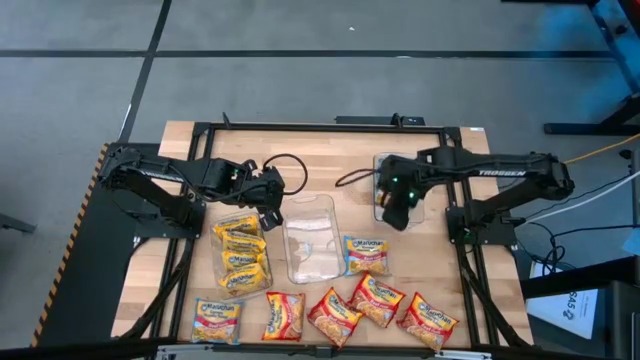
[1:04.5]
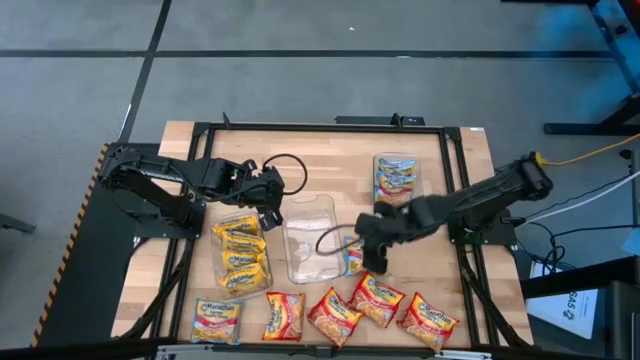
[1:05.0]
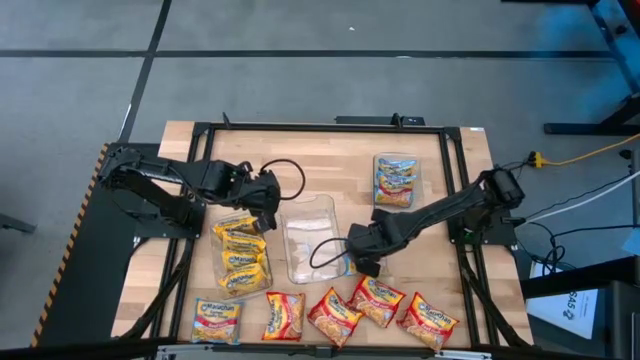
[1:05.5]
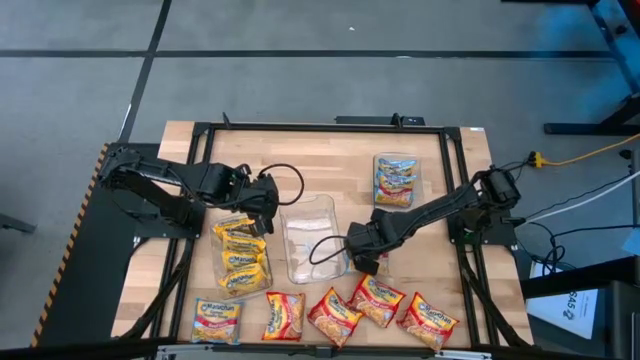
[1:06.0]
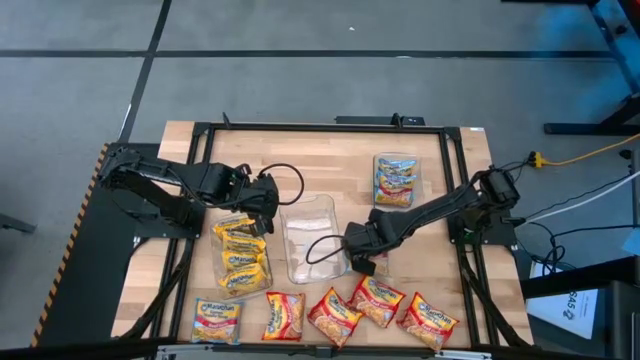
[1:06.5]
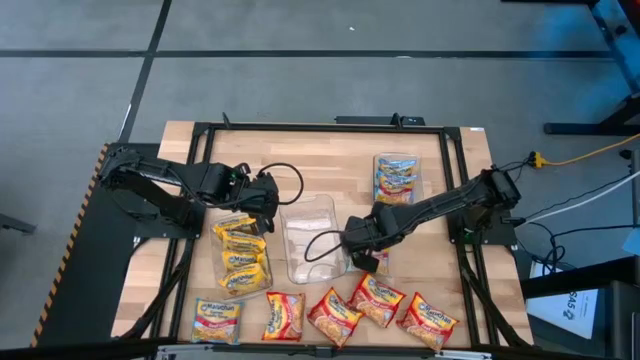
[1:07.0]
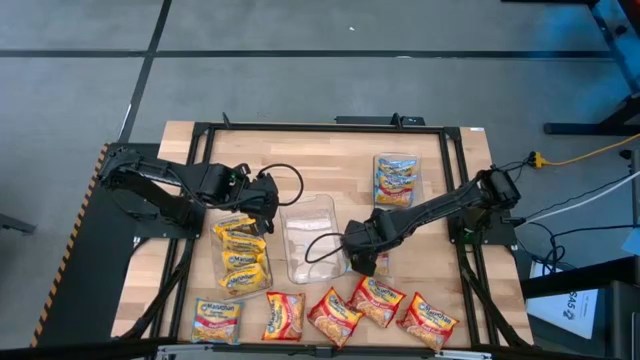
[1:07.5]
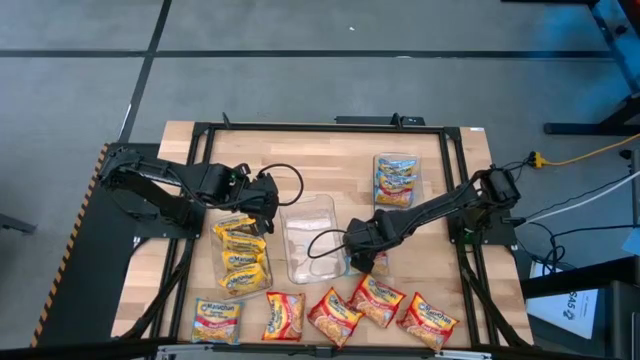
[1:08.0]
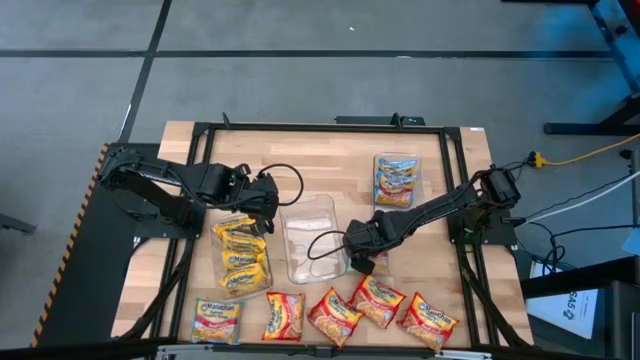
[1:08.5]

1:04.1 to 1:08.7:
Task: Sort Maruchan noodles
Put the blue noodle pack into the right transparent bin

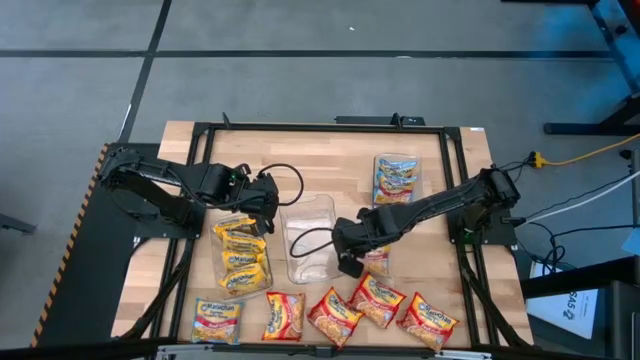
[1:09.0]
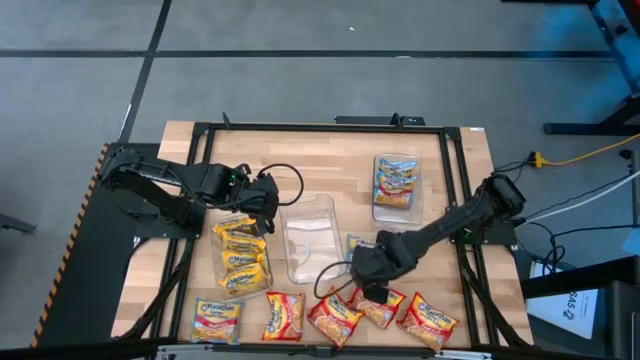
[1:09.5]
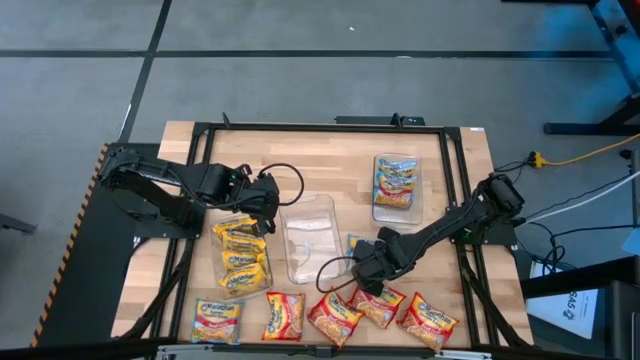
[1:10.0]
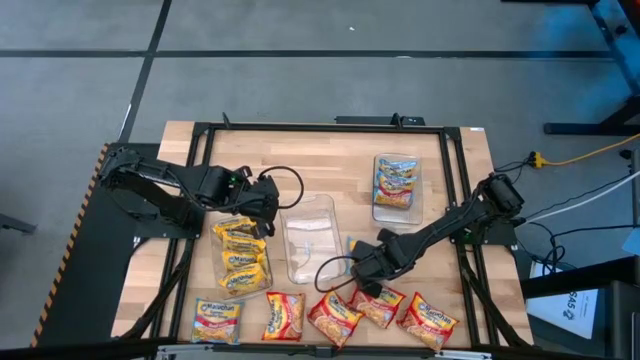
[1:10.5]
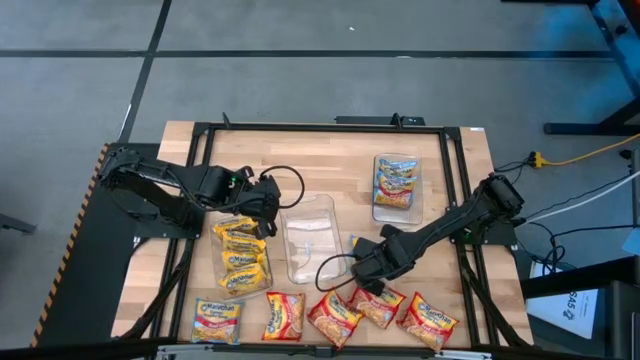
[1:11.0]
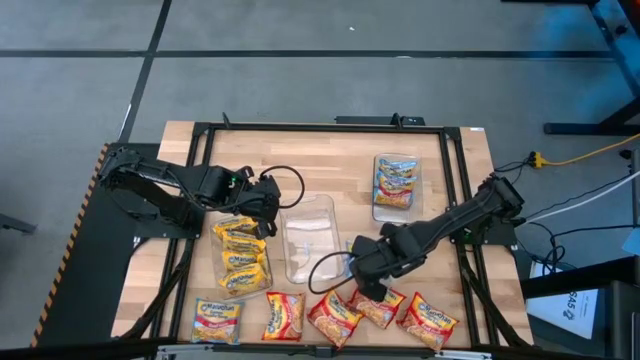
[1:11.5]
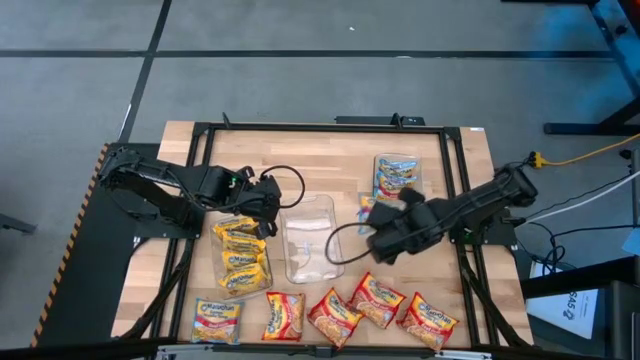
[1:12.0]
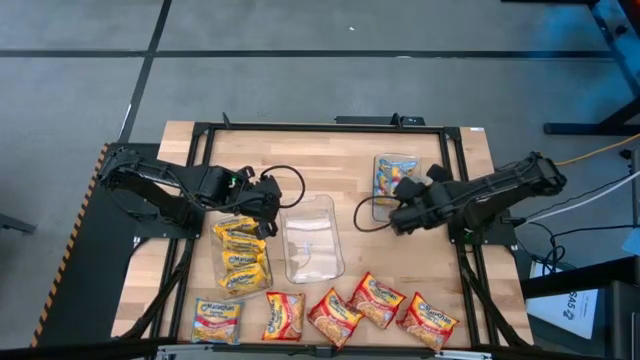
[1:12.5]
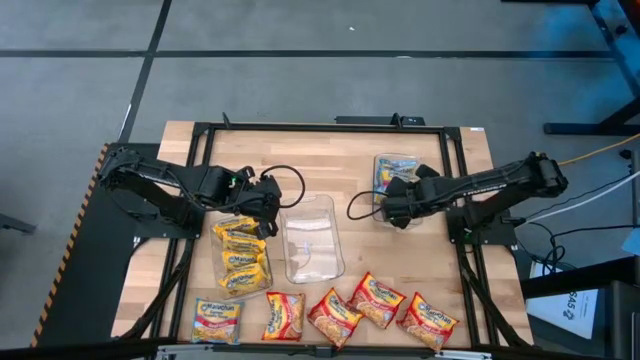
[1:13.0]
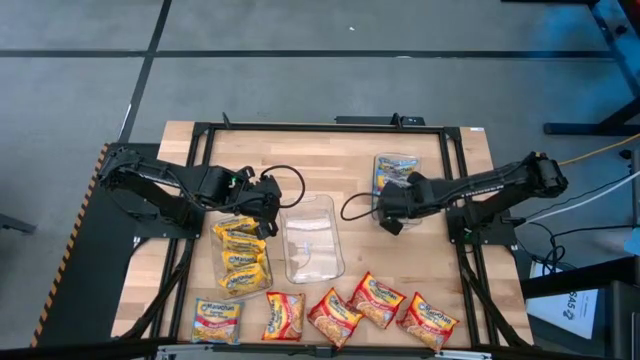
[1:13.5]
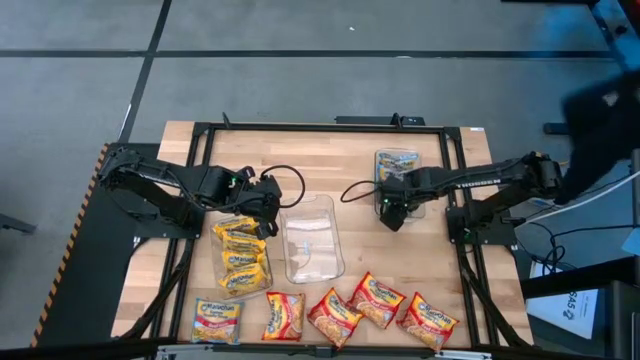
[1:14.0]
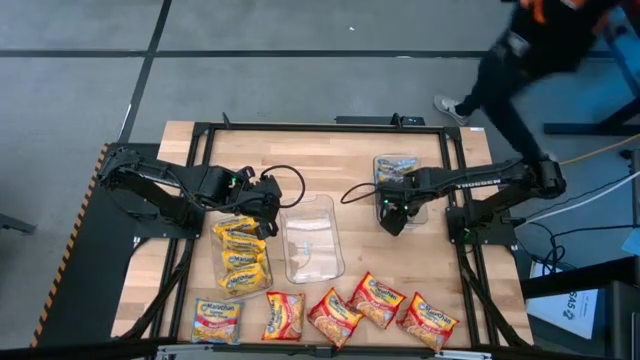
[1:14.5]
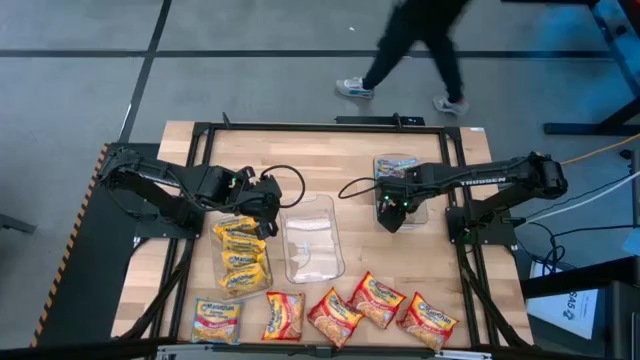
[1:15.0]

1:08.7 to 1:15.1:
Put the blue noodle pack into the right transparent bin

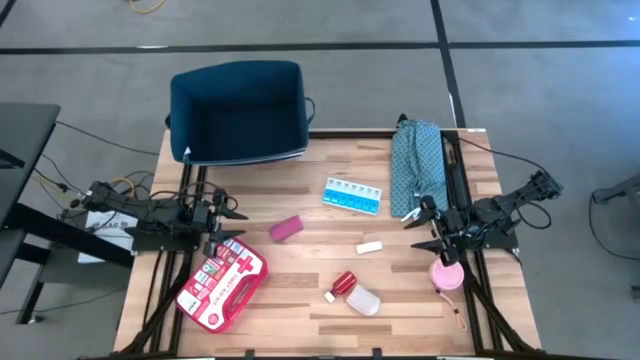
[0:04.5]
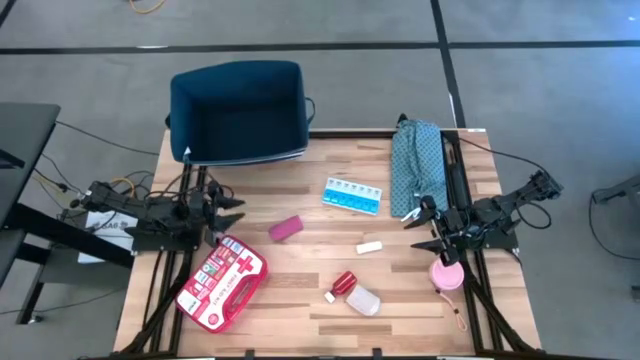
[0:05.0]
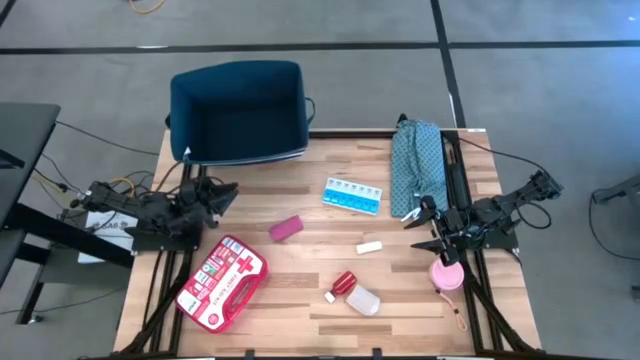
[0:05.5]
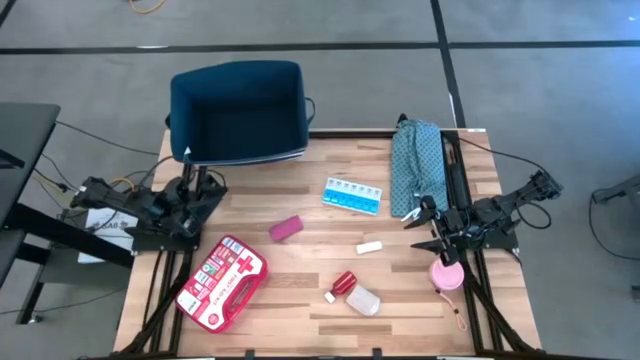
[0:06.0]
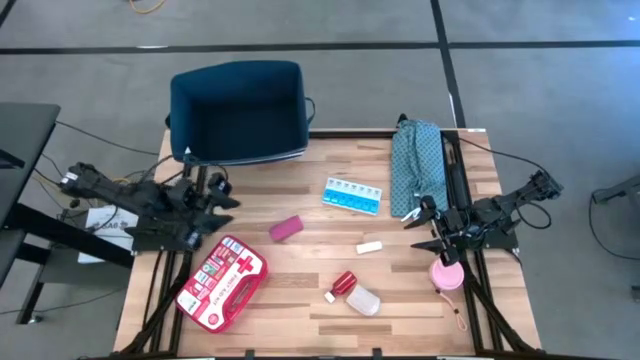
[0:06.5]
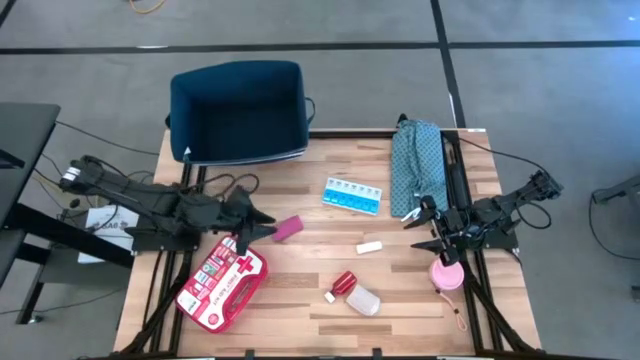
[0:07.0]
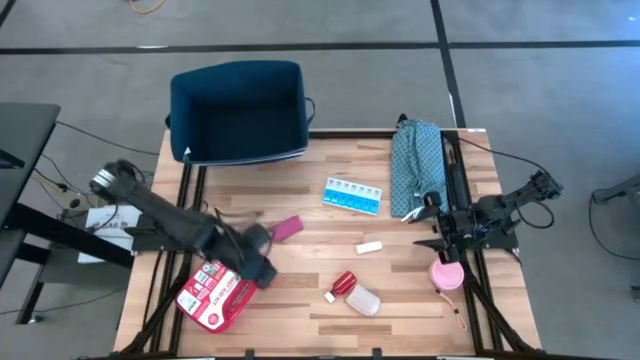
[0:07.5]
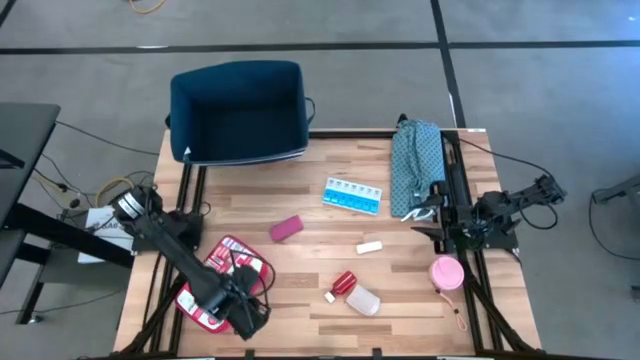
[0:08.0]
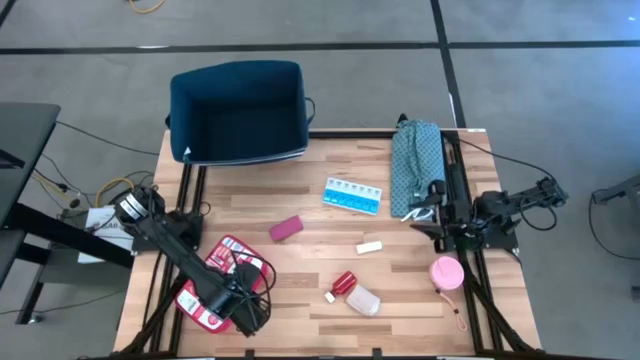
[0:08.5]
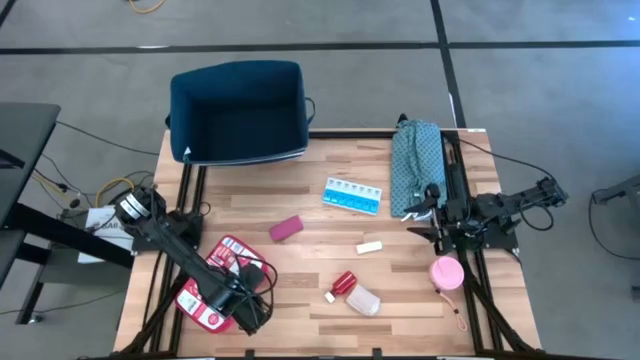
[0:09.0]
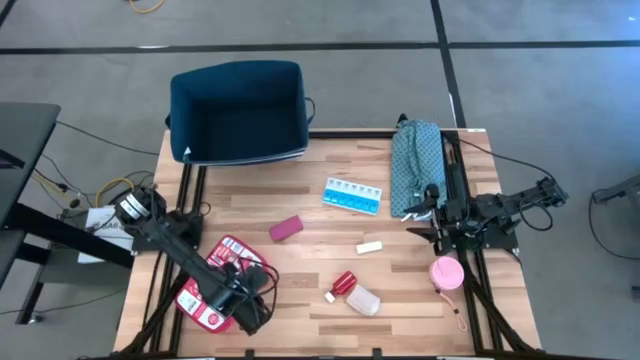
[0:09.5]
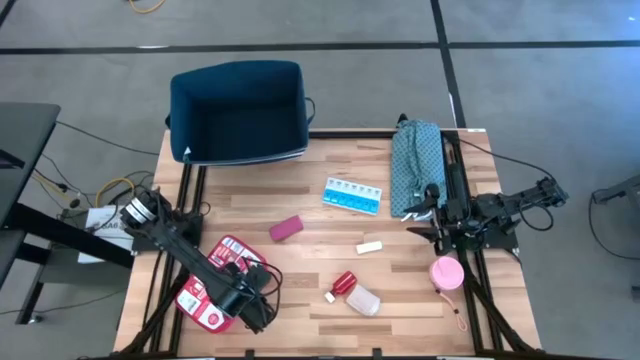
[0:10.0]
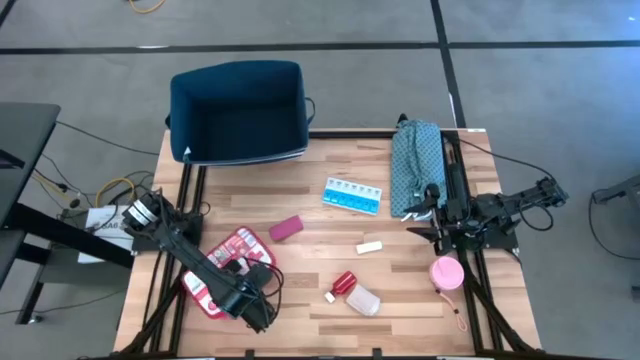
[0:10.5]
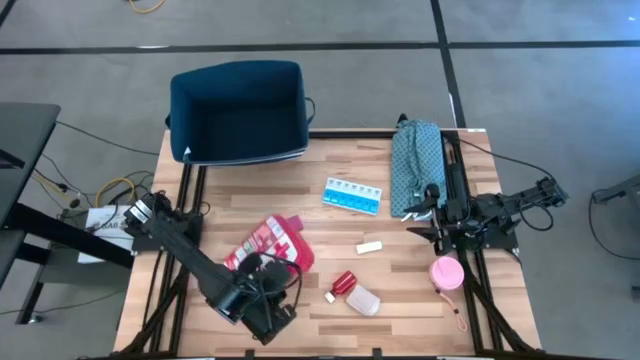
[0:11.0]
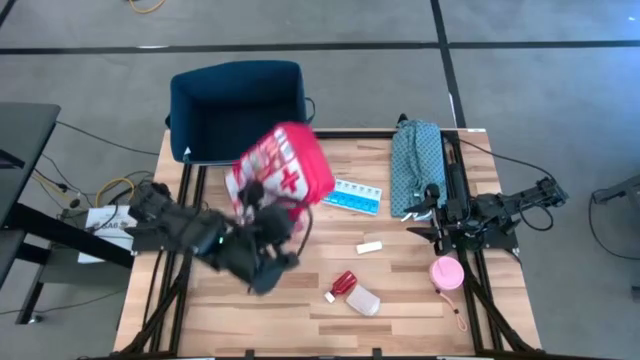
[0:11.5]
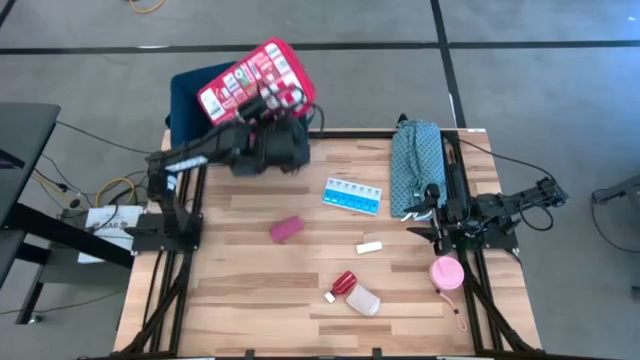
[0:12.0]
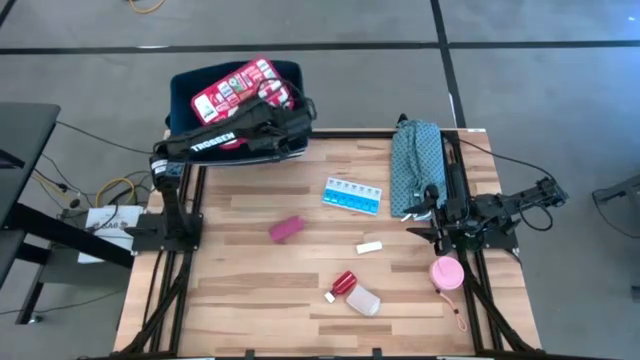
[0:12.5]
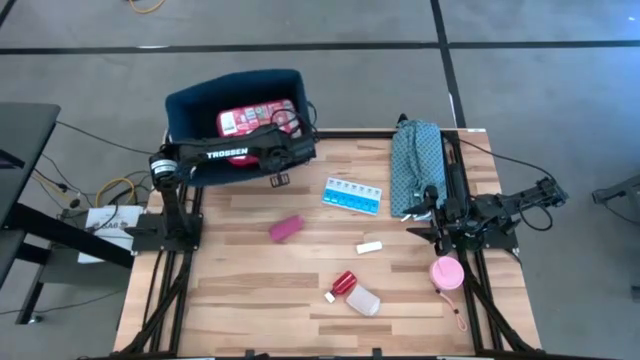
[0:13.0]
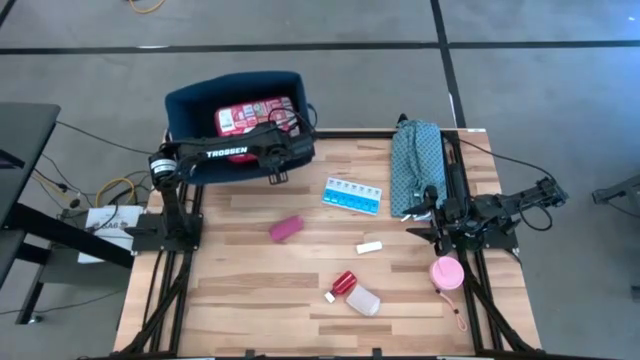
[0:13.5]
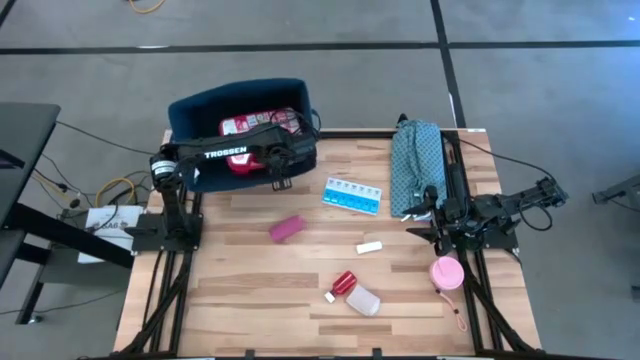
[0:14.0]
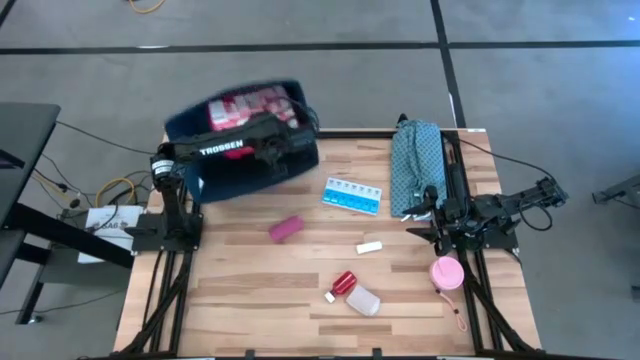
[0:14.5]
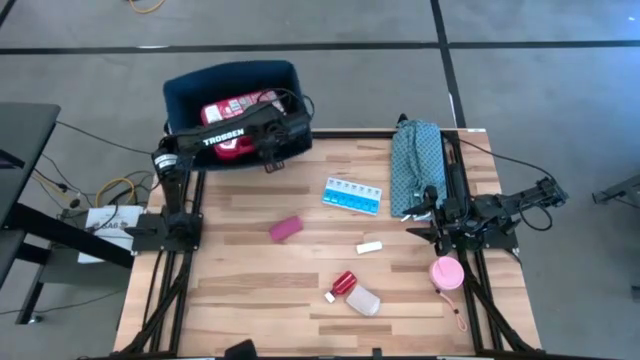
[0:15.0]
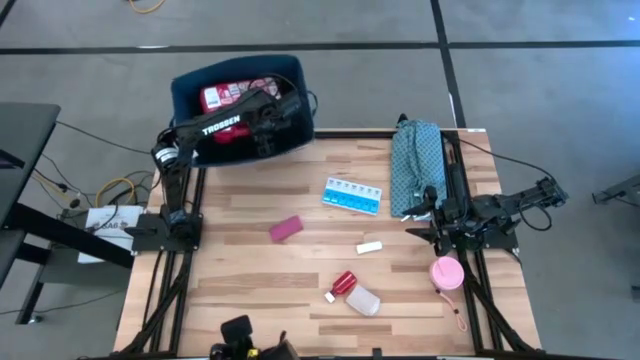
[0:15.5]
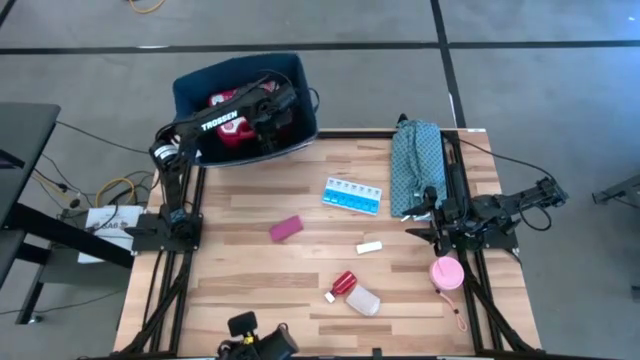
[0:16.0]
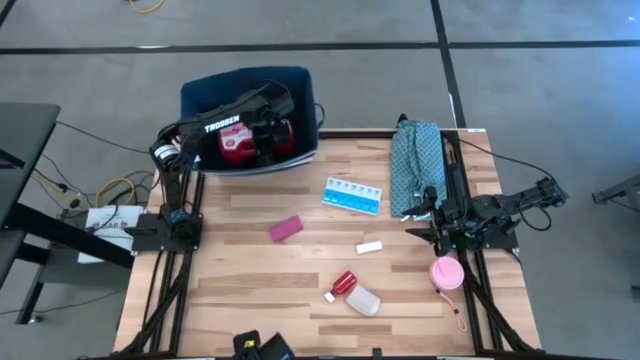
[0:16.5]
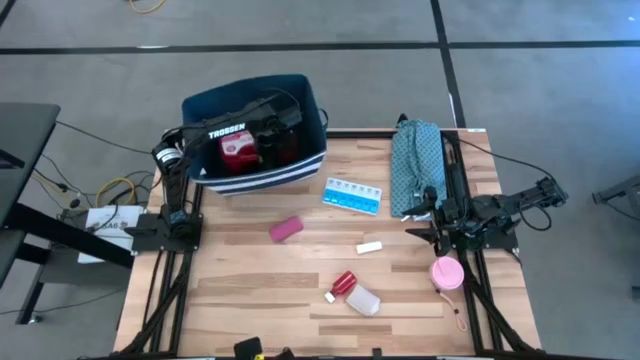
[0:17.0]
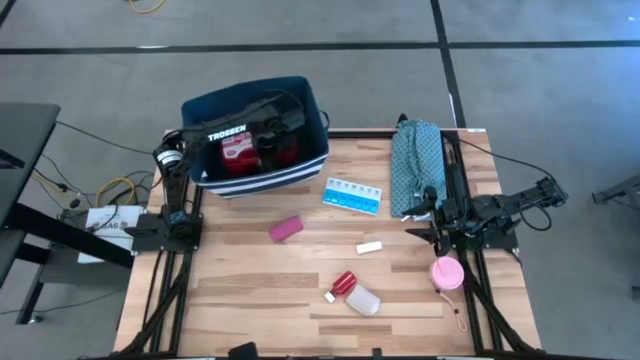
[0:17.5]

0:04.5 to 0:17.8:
Task: Pick & place medical supplies in basket/bin
Put the red first aid kit into the blue bin
